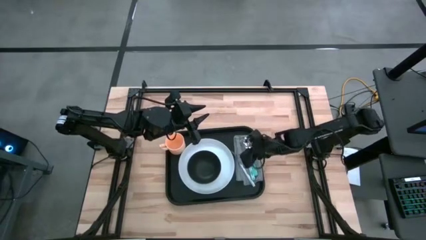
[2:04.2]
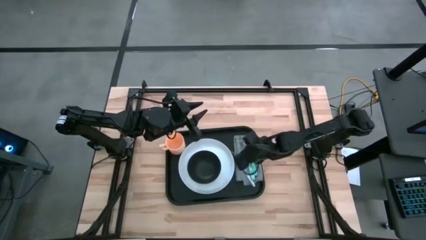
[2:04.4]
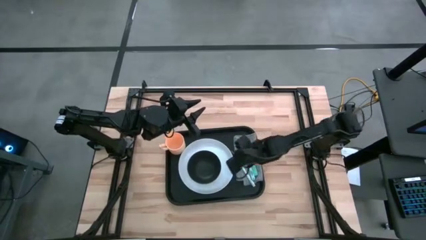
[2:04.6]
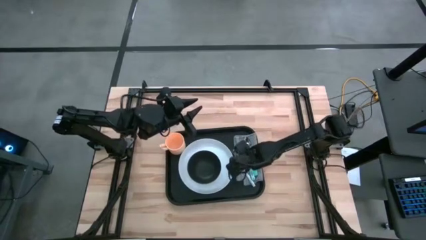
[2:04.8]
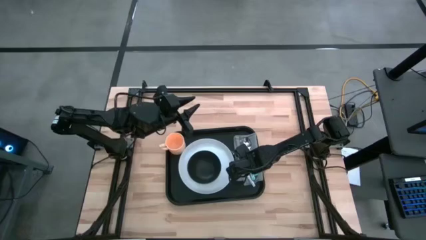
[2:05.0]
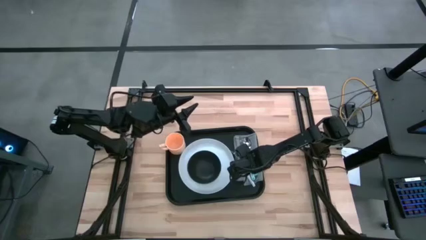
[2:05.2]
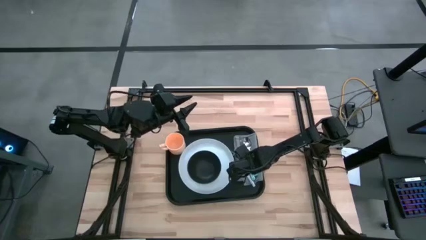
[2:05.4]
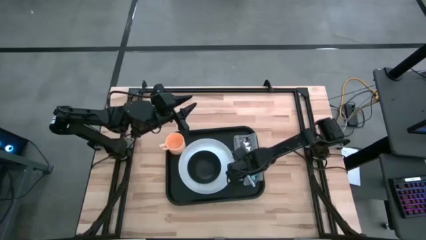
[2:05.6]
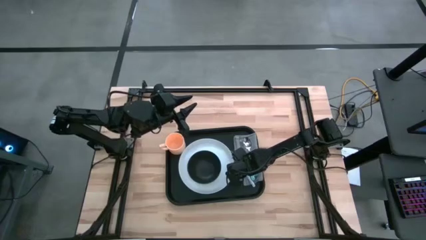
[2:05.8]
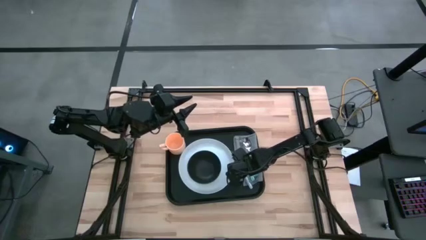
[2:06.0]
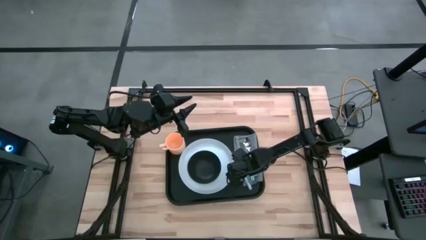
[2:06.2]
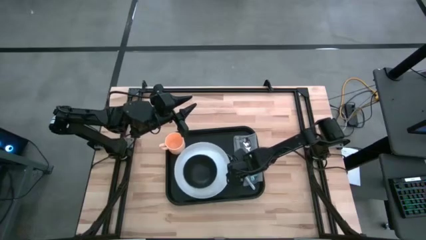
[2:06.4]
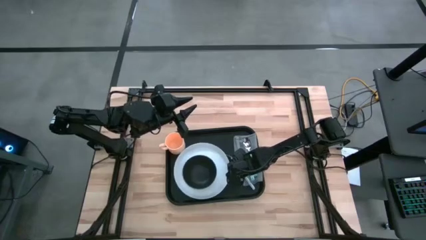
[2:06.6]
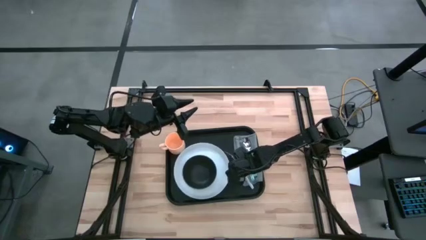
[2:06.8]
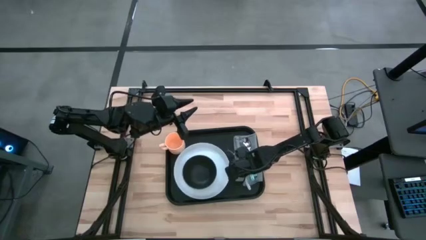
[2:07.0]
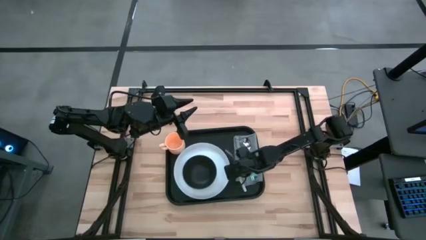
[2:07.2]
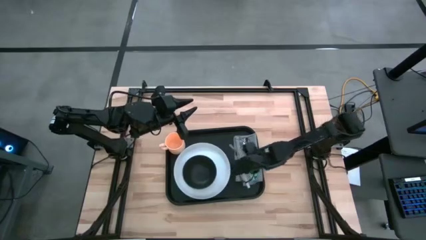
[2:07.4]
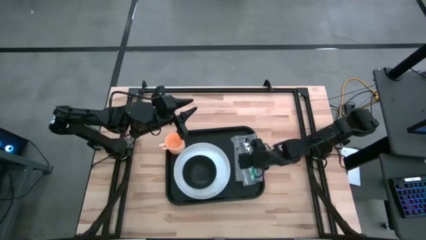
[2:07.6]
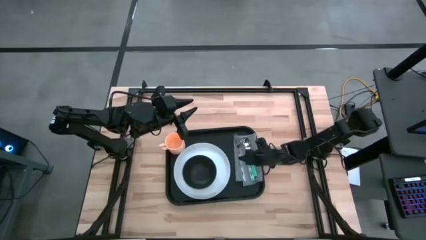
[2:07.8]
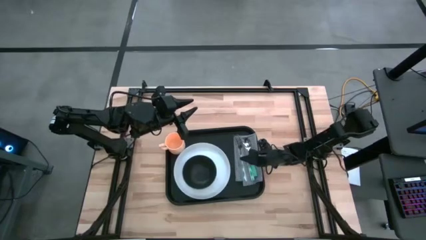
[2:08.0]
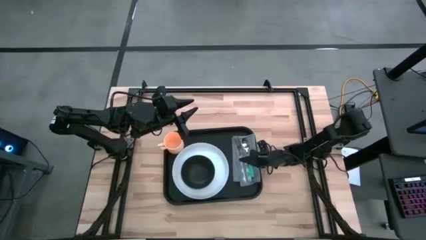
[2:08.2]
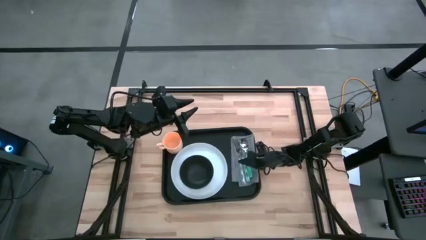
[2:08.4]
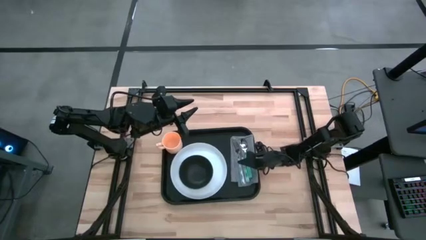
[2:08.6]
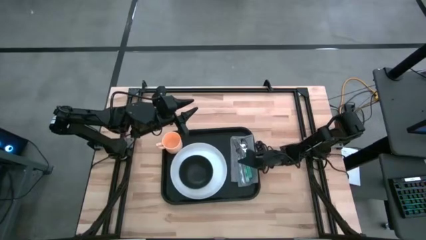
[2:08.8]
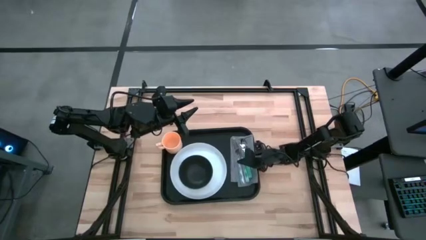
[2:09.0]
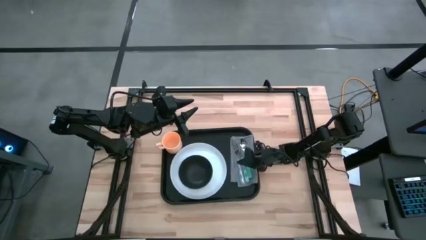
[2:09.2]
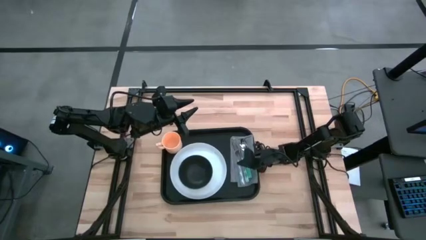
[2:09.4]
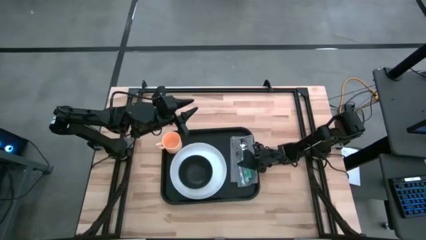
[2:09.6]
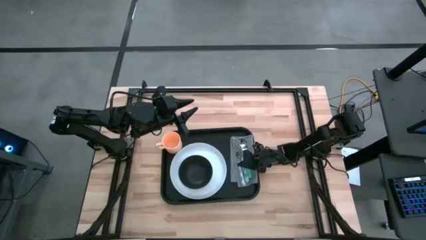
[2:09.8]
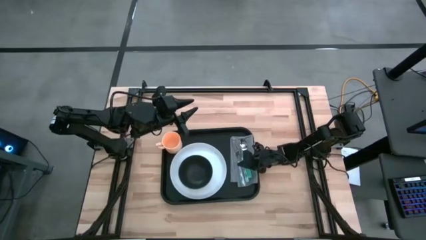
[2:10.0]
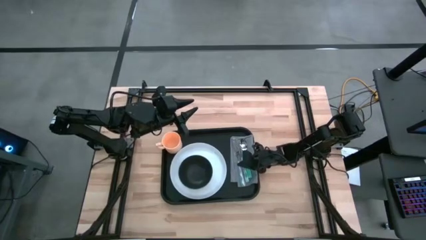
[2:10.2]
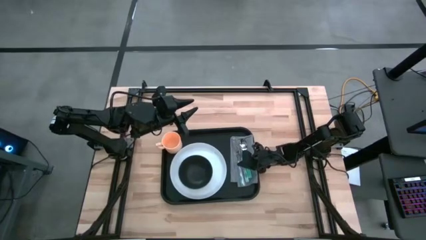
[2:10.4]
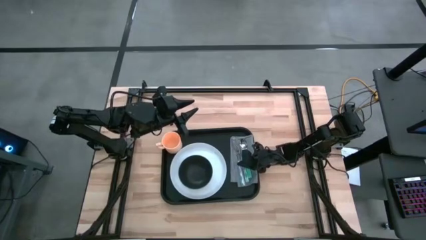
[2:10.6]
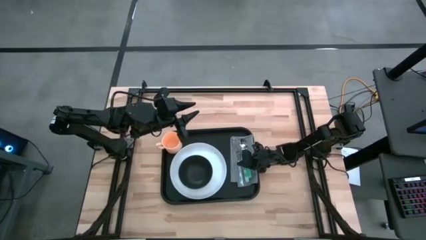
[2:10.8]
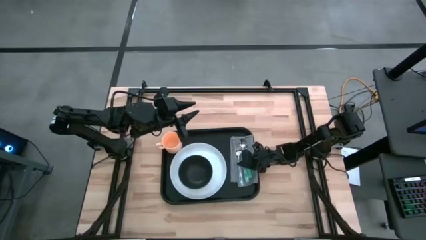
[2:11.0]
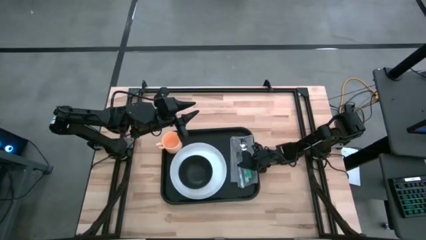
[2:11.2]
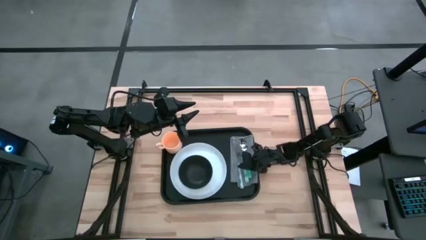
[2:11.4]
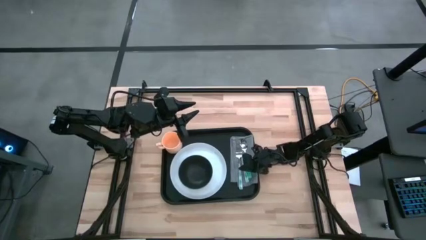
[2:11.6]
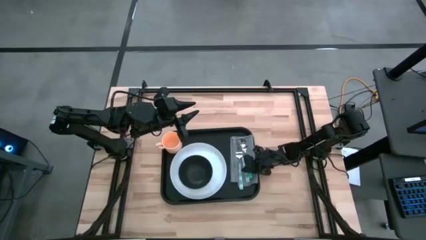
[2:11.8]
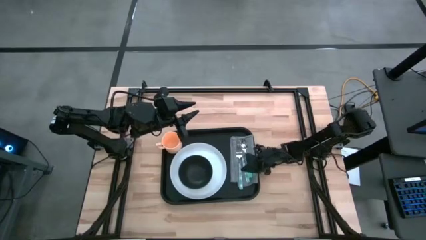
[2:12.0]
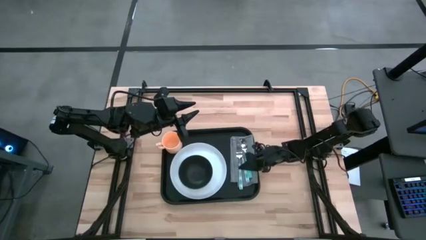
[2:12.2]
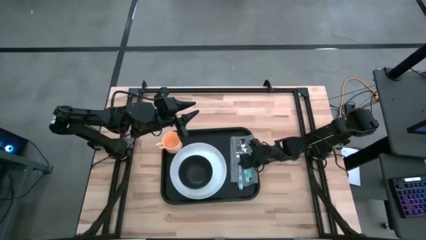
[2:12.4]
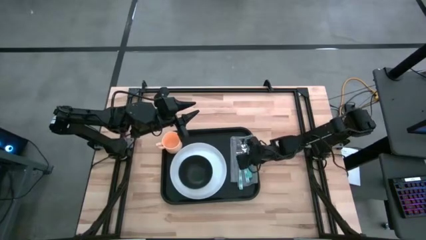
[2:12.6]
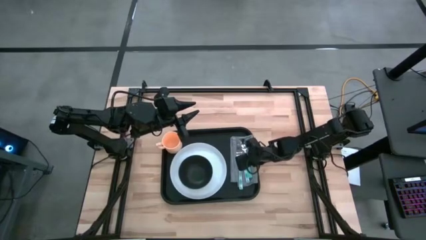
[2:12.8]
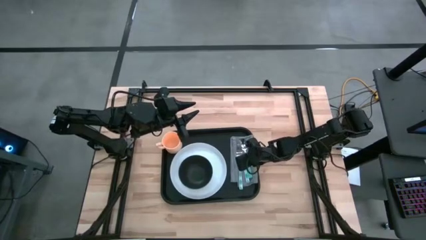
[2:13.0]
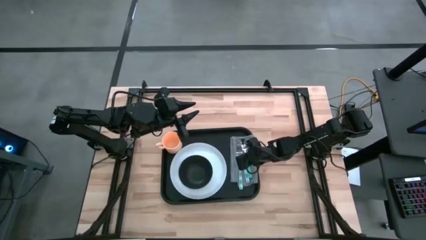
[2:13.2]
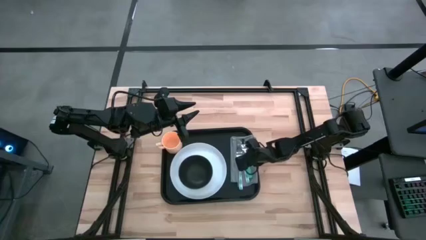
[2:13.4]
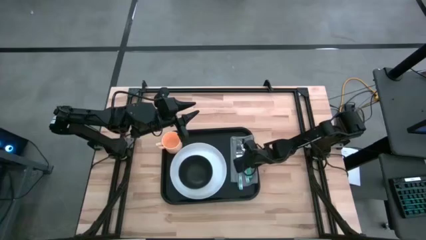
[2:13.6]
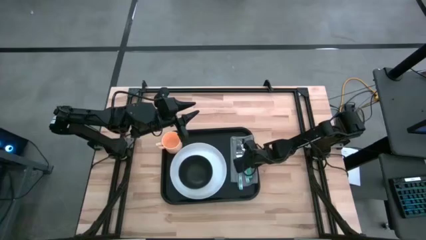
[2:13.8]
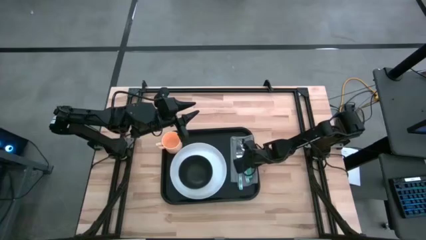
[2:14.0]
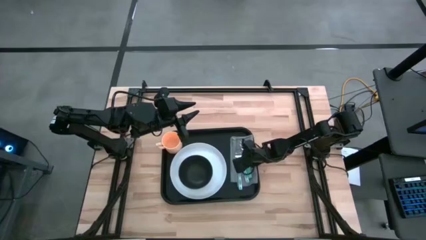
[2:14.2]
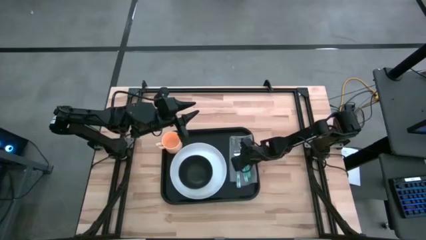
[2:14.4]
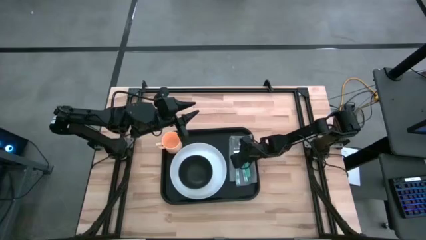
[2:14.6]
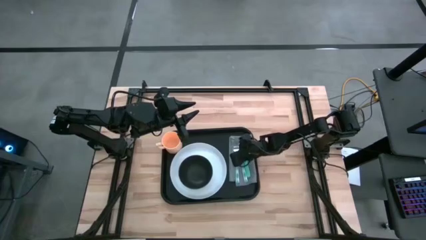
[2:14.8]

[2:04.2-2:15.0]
Task: Set up tray
Put the blue fork on the gray napkin

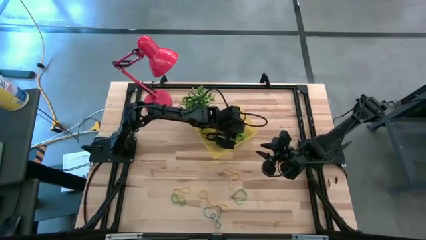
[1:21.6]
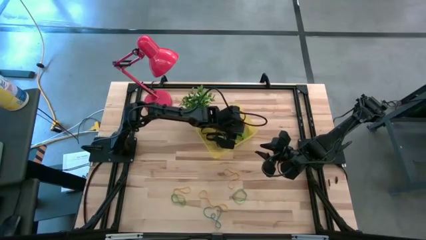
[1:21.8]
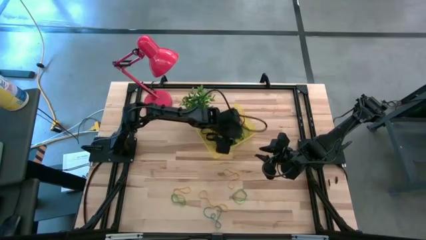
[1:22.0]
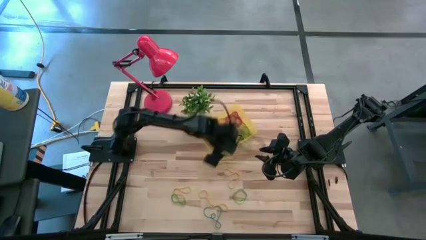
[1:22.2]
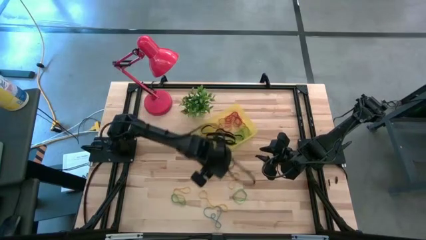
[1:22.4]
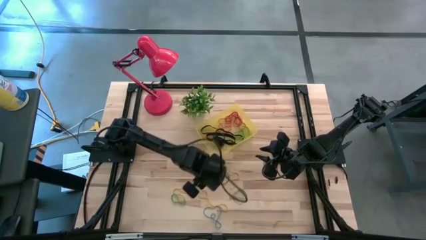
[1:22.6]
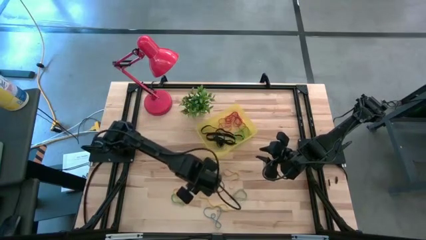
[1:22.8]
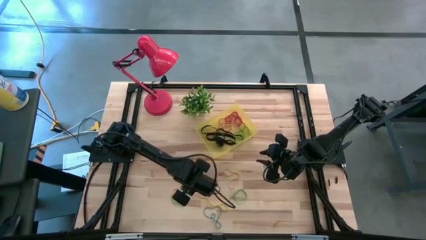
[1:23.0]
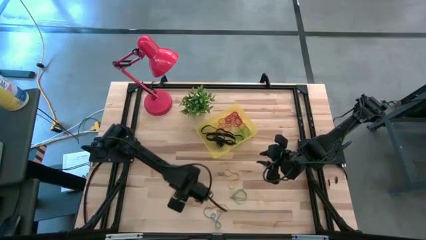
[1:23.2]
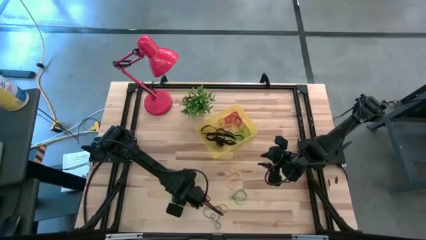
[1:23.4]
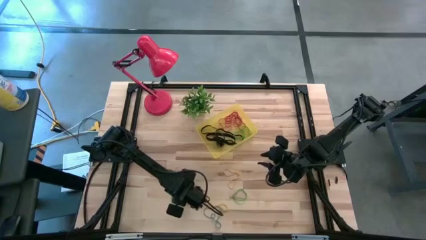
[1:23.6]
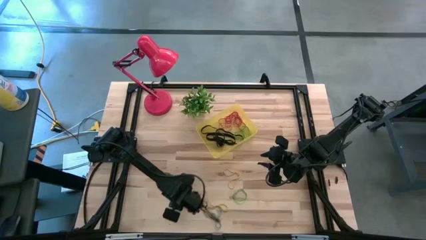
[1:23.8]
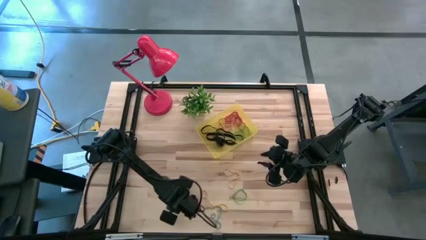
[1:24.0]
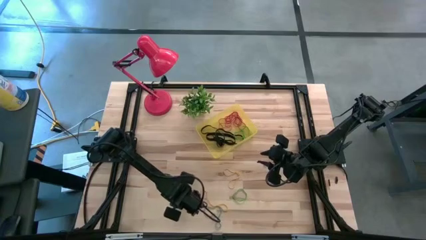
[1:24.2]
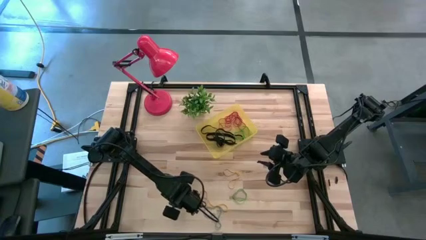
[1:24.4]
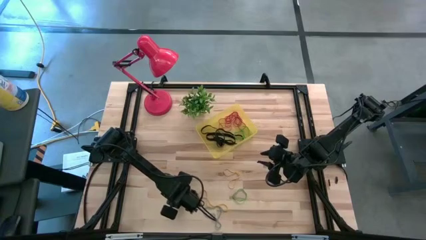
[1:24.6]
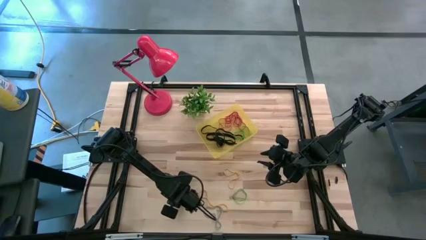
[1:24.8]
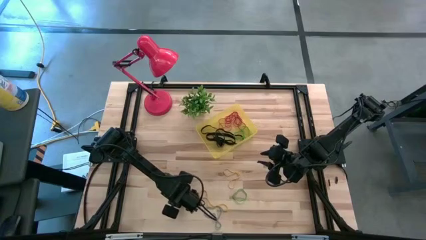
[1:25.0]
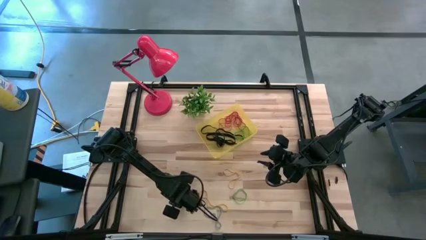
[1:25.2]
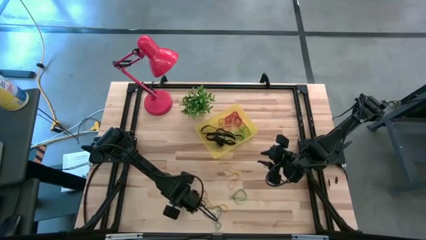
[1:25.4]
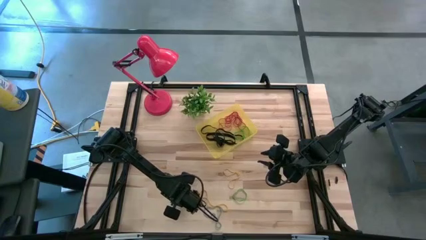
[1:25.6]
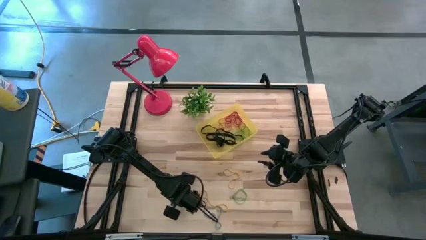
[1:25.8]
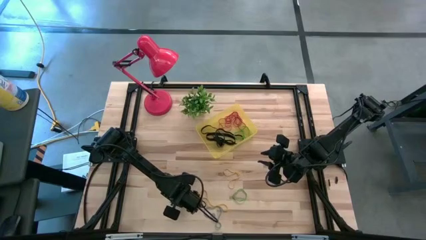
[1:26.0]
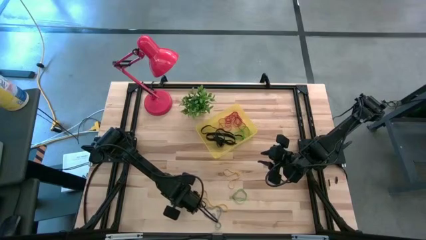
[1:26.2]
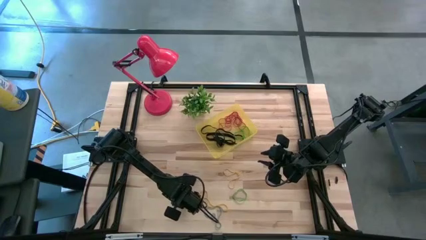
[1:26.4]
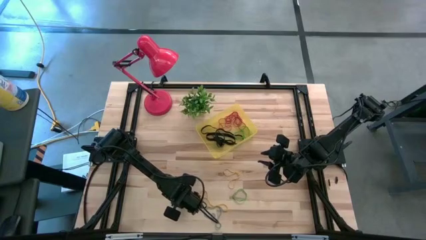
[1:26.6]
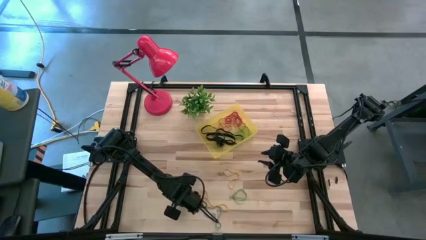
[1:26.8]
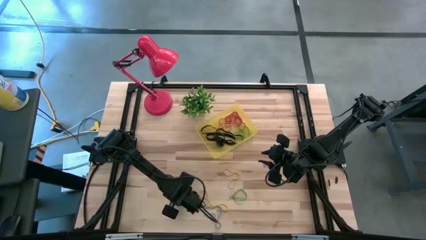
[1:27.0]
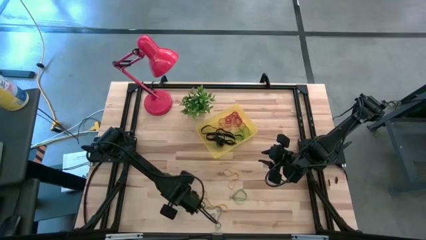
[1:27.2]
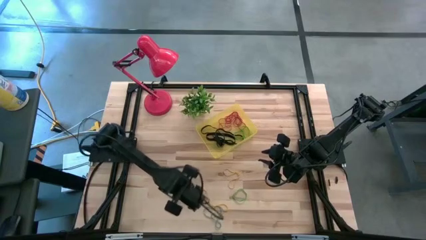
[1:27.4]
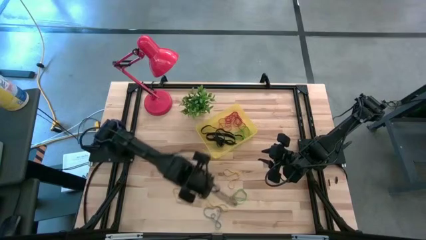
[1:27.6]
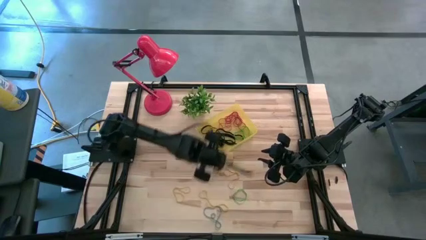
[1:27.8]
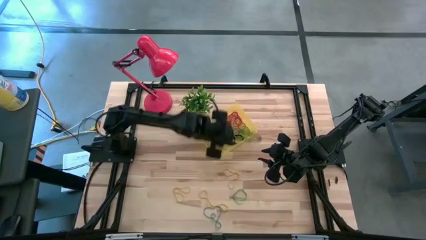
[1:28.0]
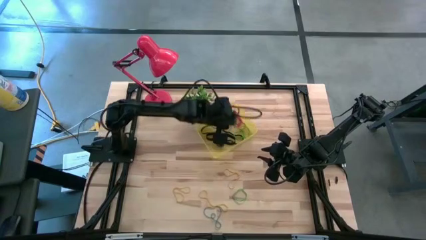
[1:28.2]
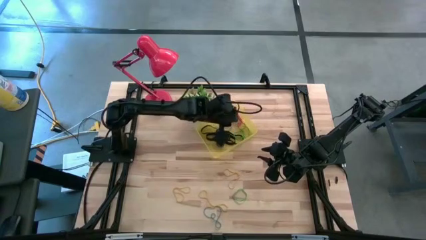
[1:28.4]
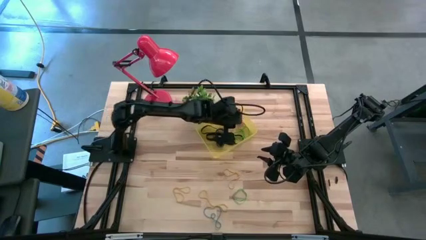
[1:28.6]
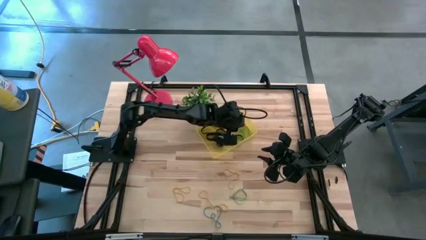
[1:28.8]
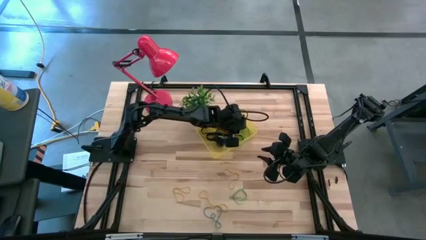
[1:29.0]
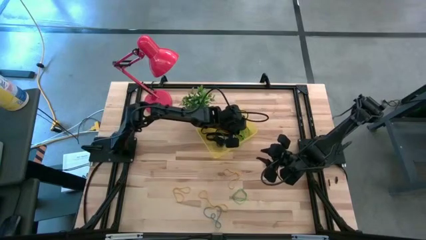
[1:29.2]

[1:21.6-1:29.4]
Task: Pick and place rubber bands into bin
Put the green rubber band into the transparent yellow bin
